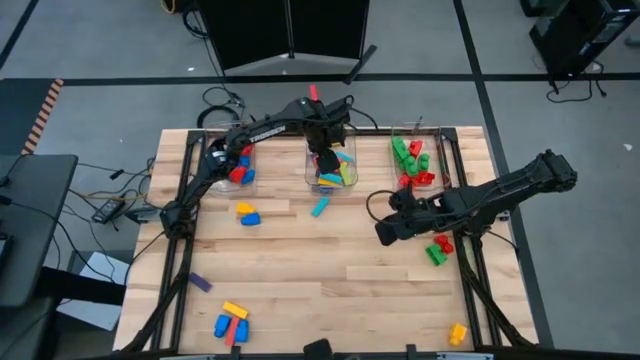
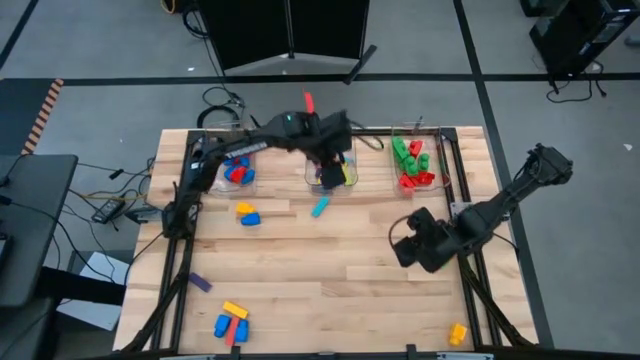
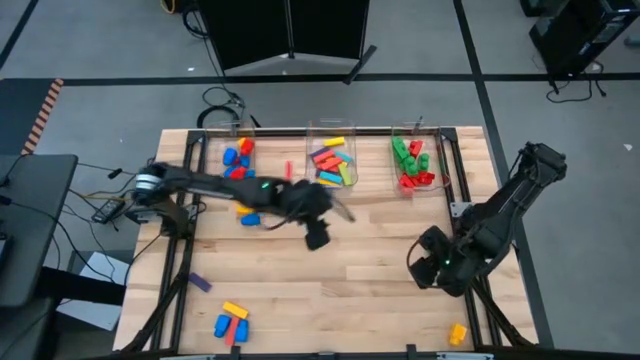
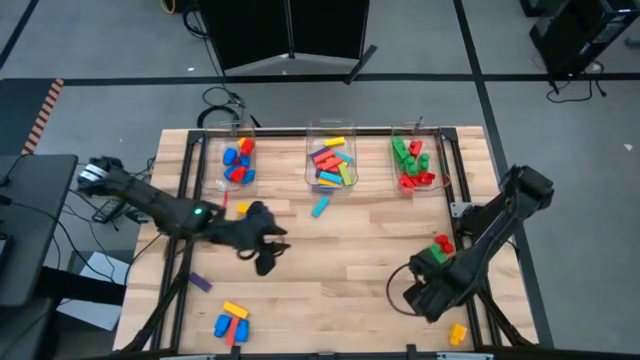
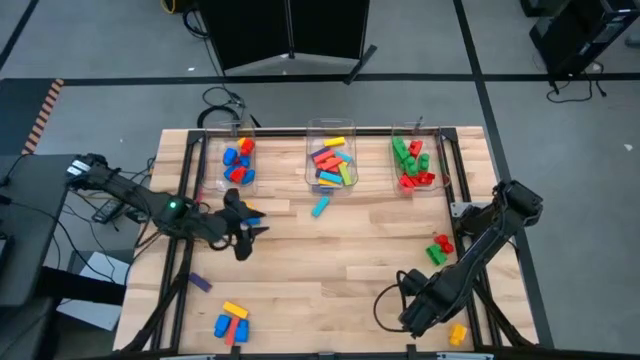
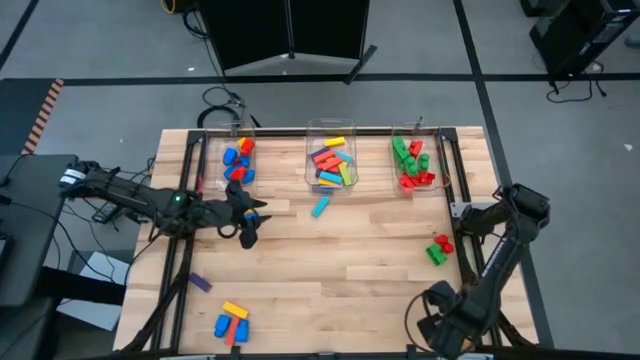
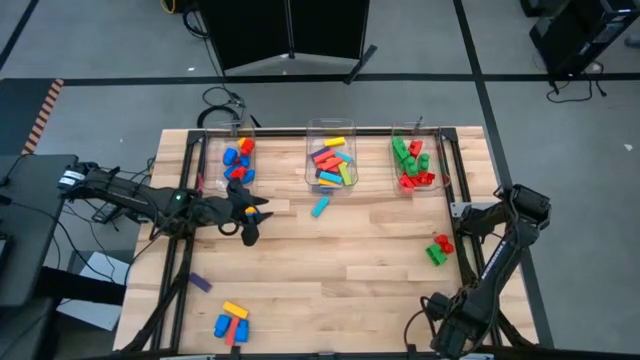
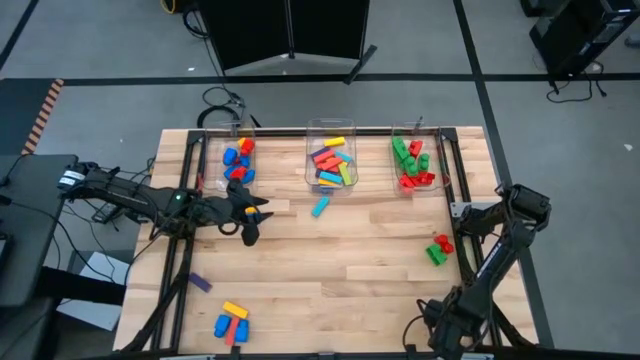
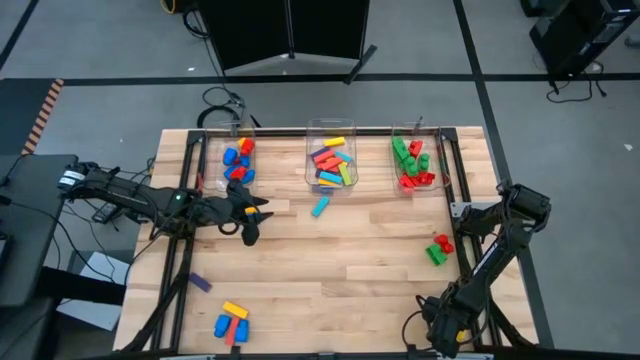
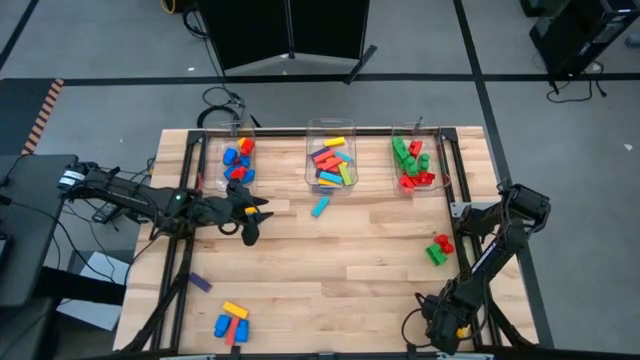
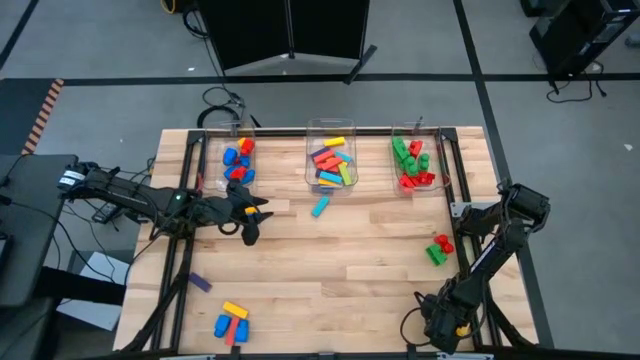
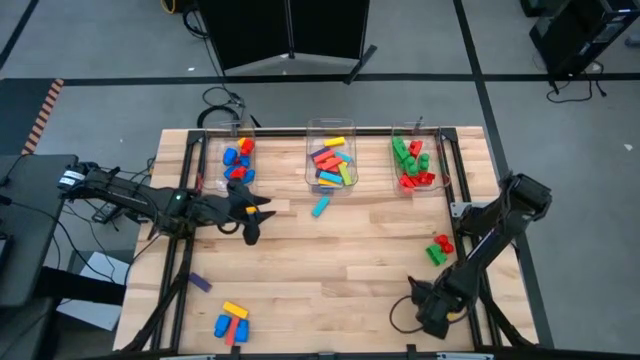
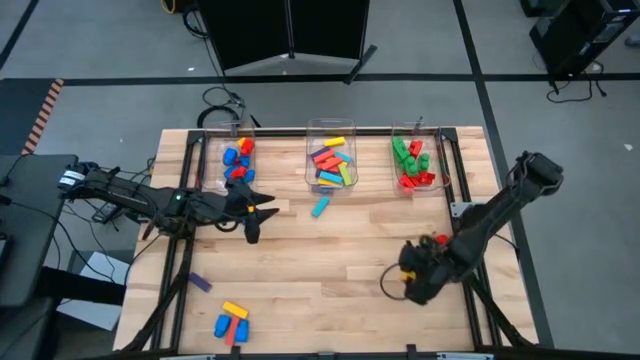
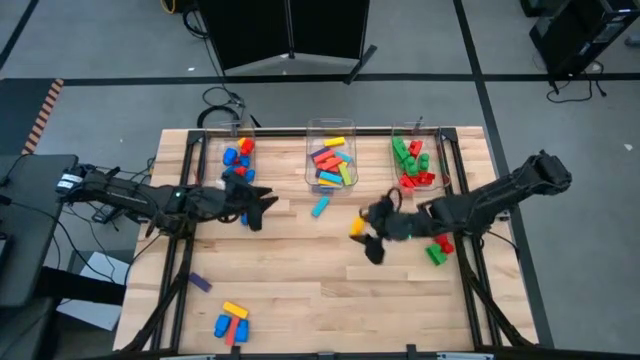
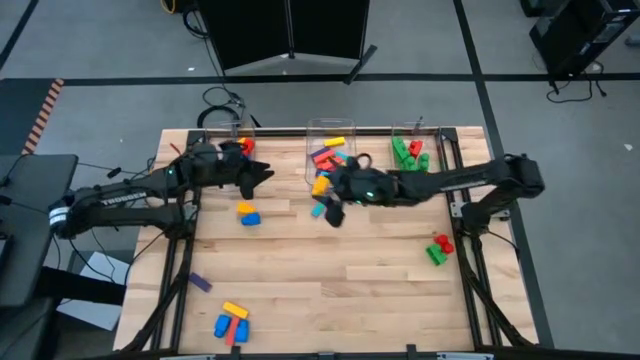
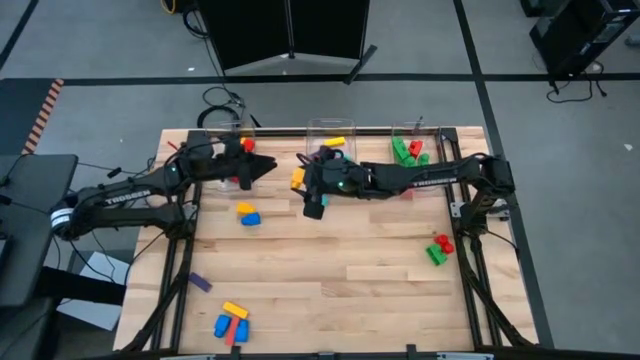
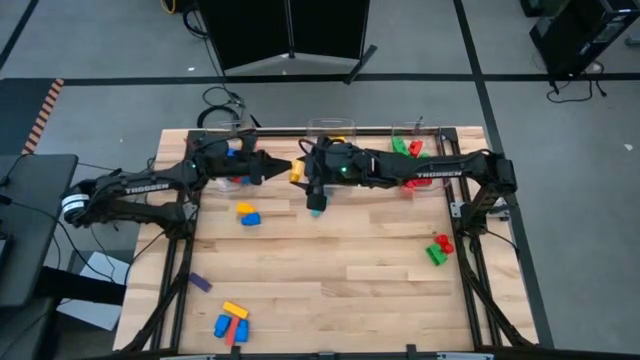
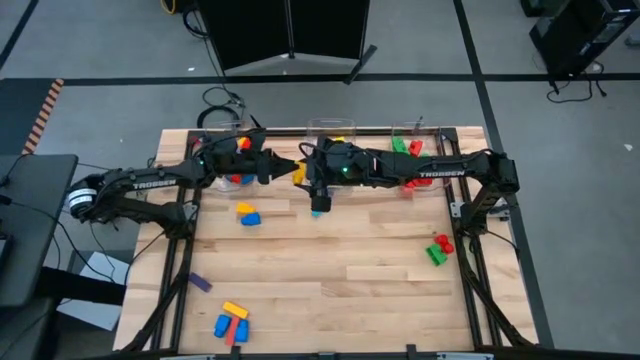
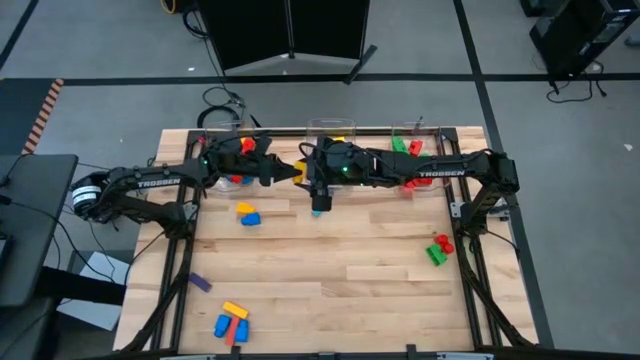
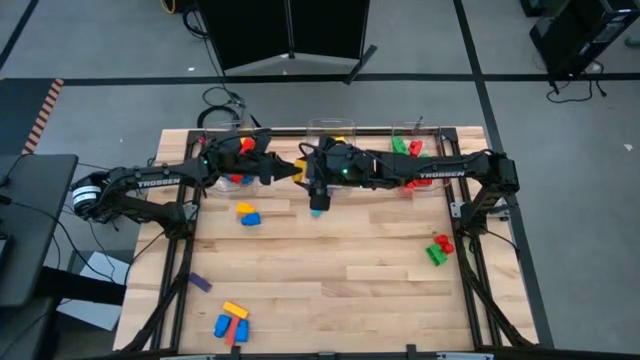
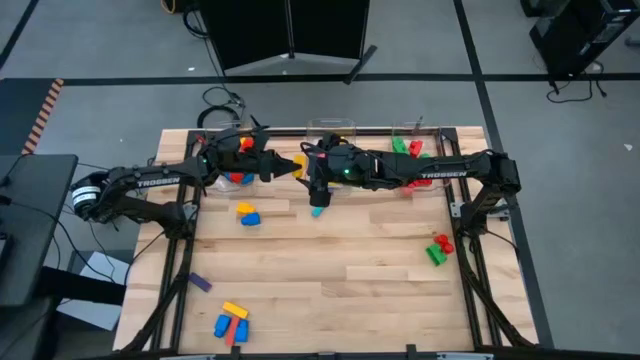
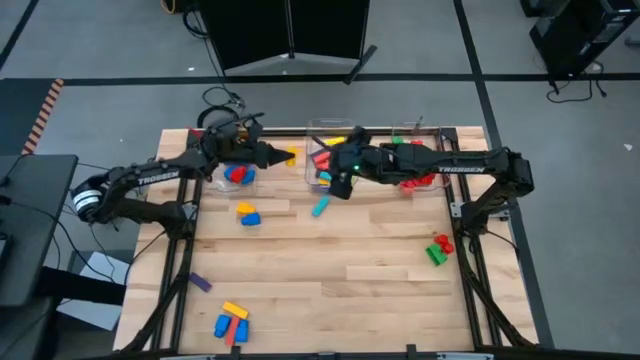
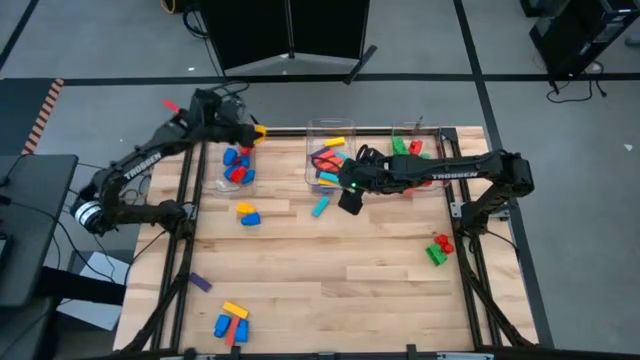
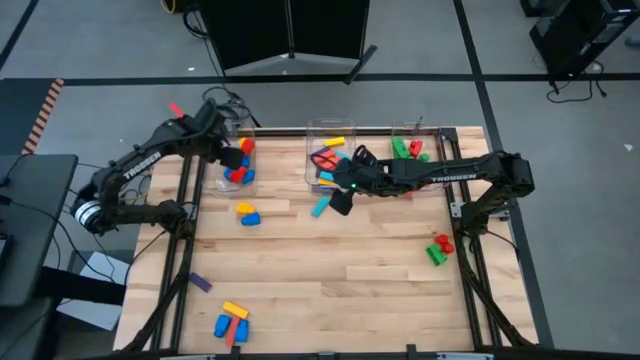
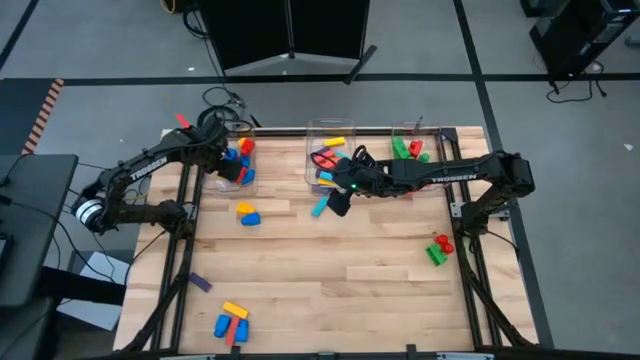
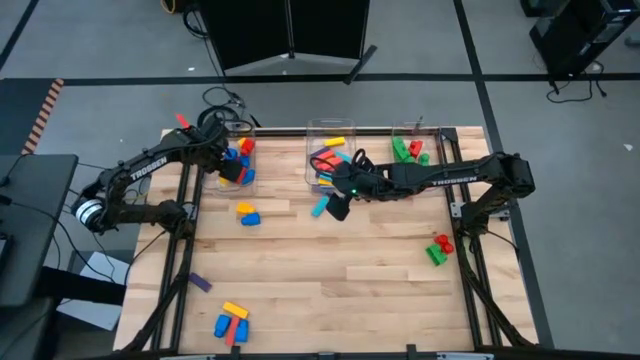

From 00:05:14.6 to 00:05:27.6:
Task: Sort blocks by size
Put the yellow 1 stud game piece into the left transparent bin

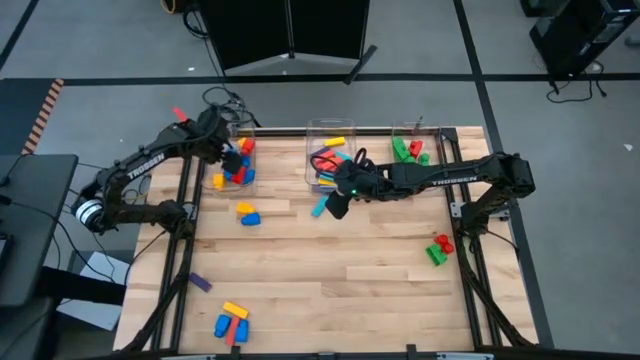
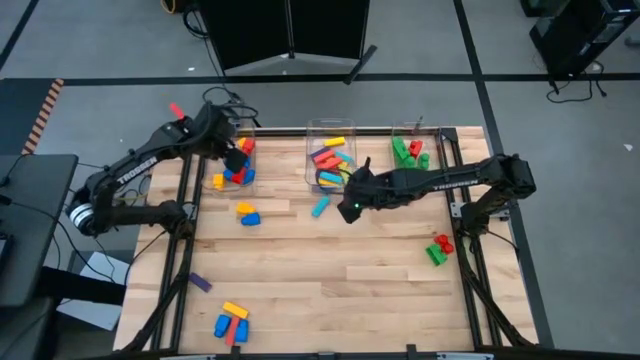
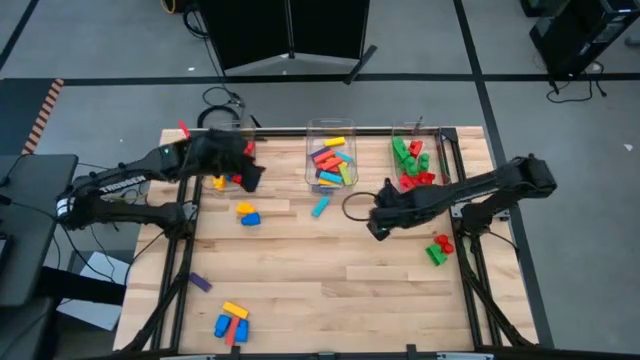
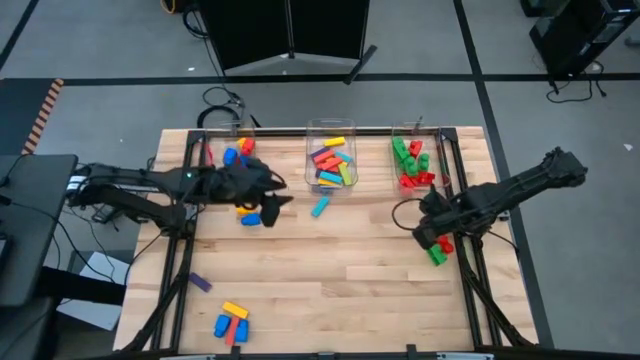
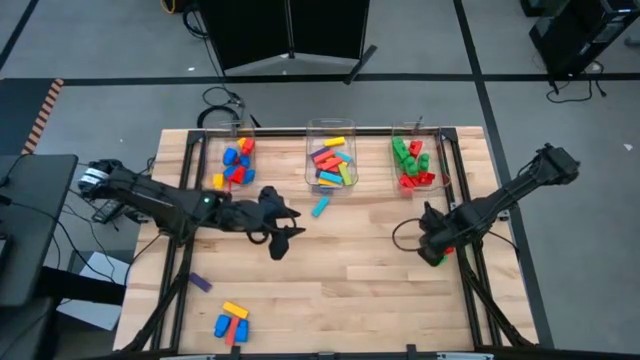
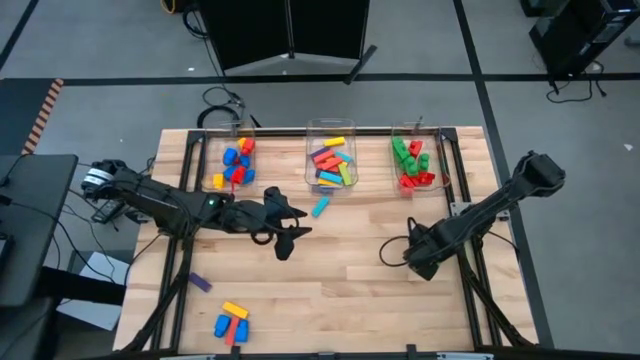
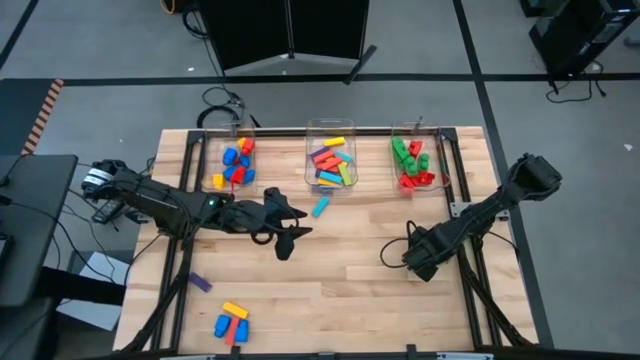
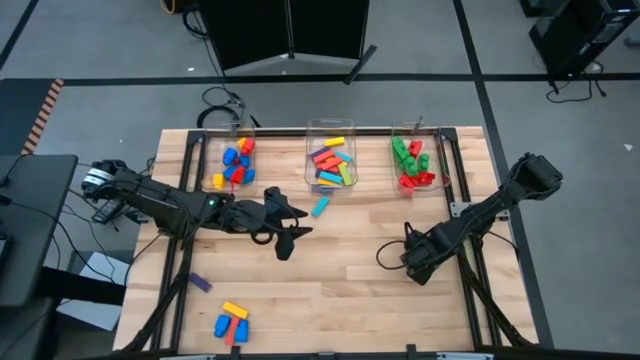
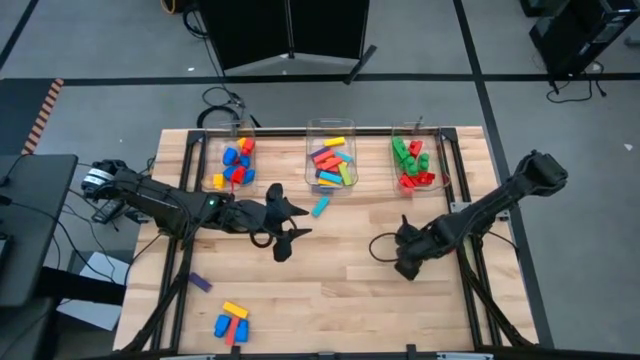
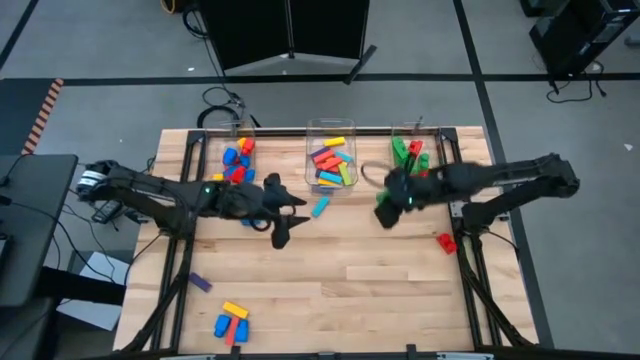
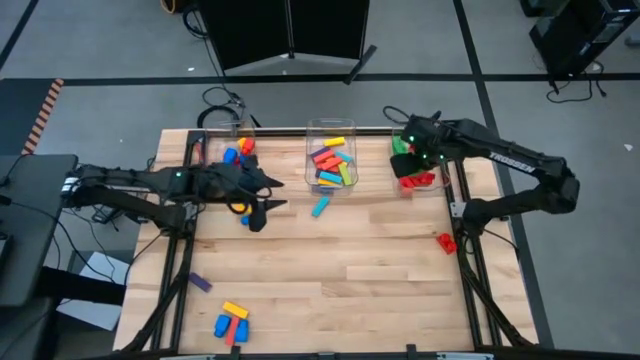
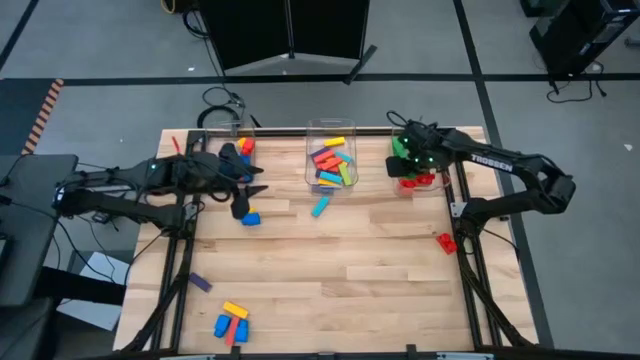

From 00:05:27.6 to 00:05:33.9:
Put the green 2 stud game piece into the right transparent bin

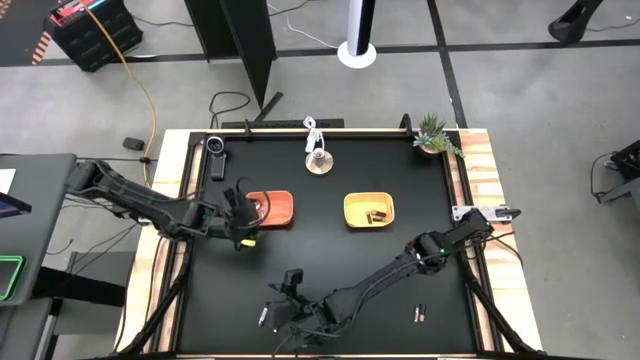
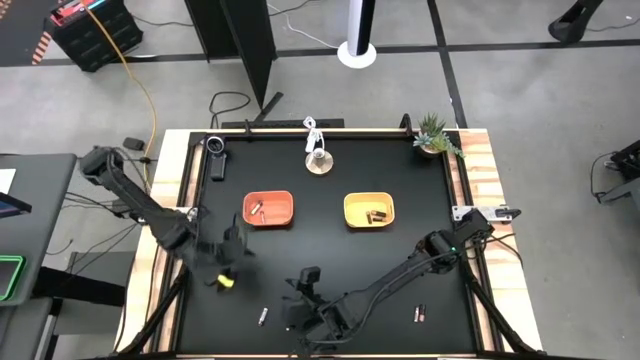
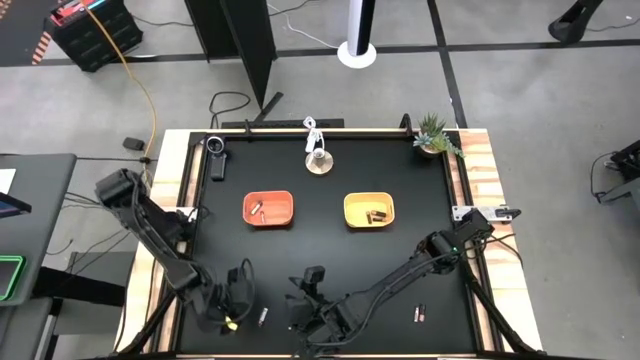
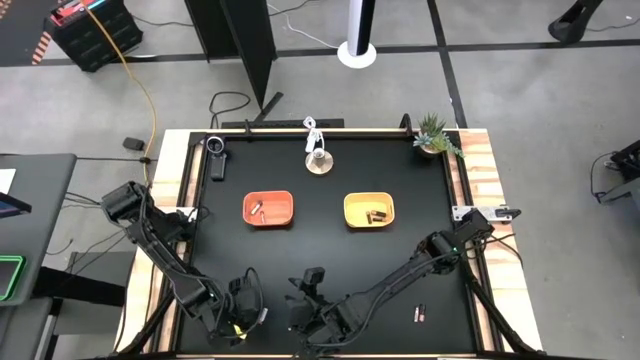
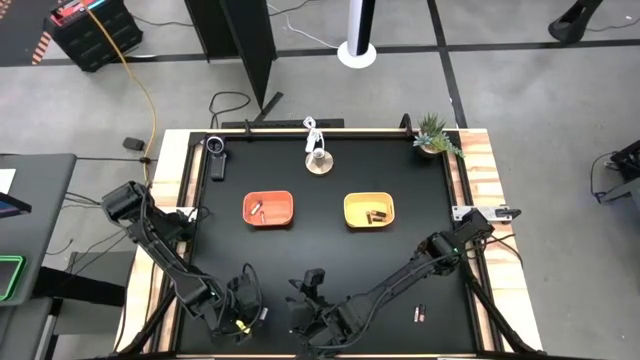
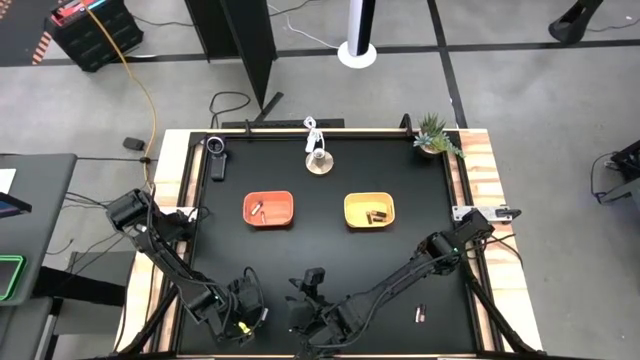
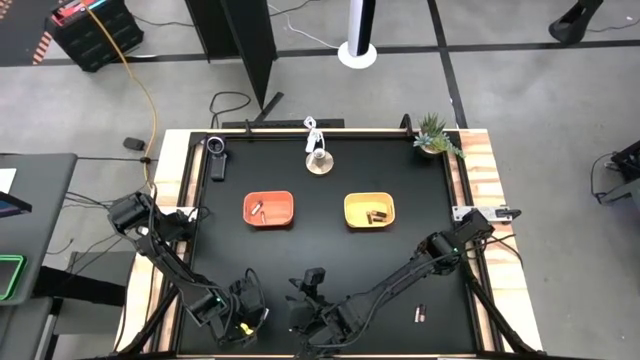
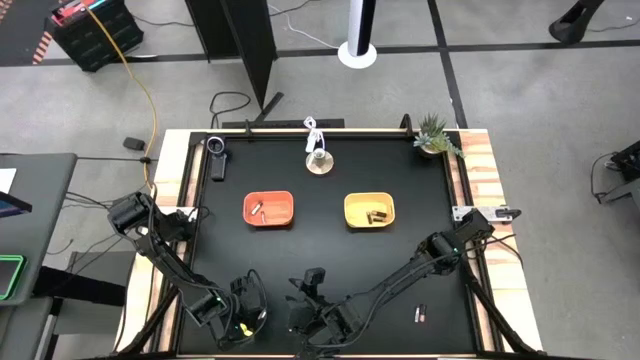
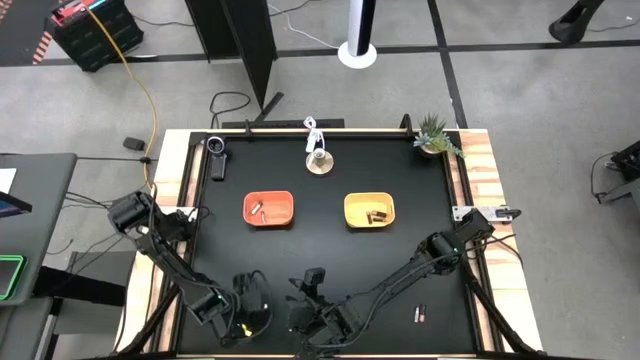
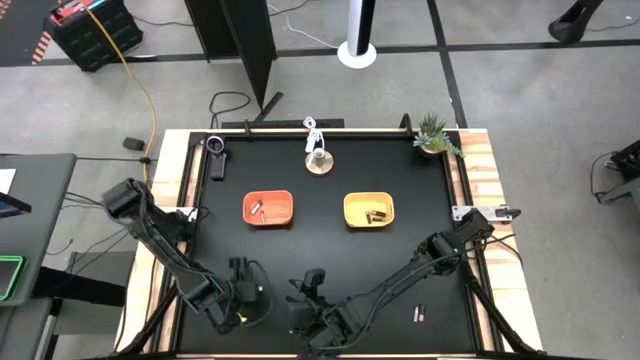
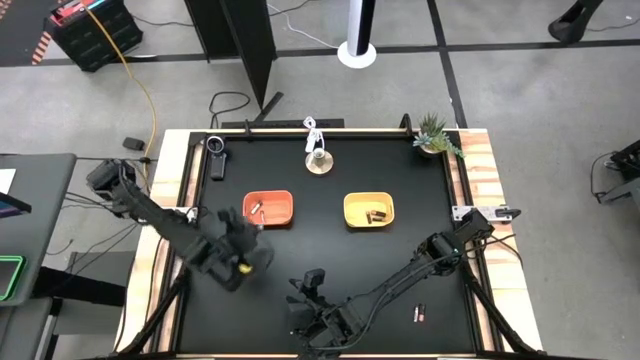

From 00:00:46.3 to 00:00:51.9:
Task: Sort batteries
Put the silver battery into the orange bin
